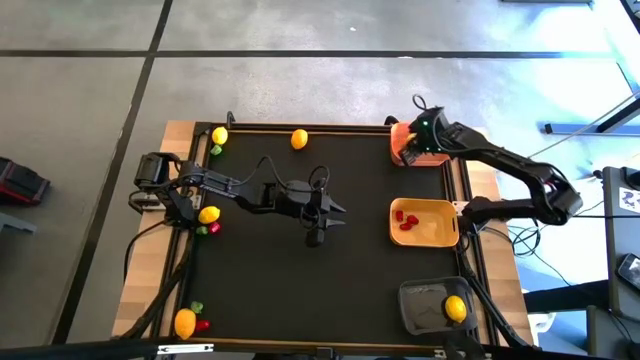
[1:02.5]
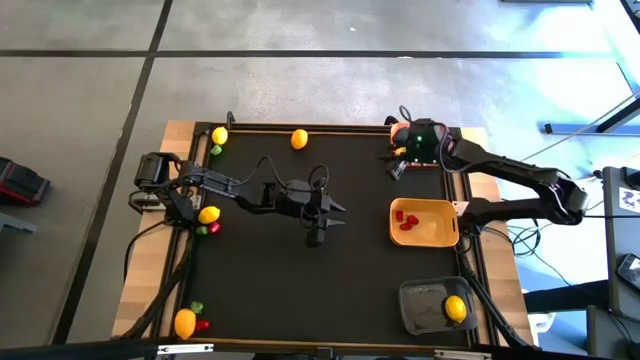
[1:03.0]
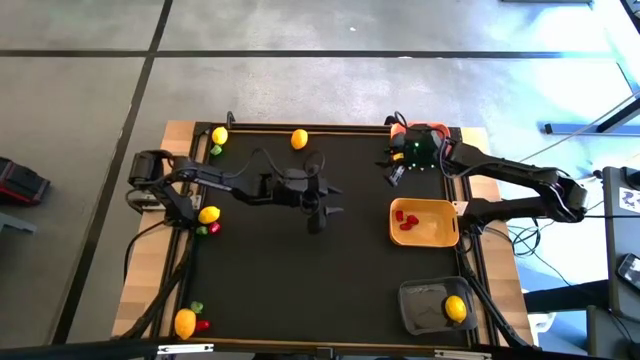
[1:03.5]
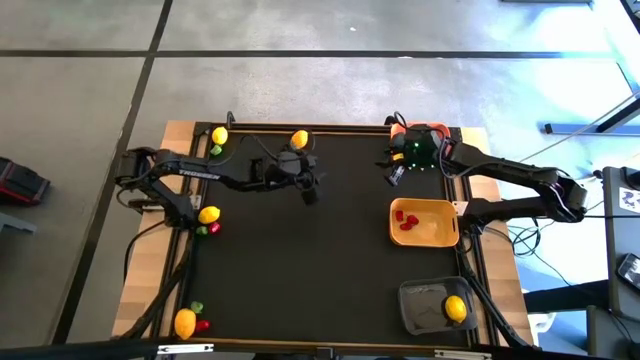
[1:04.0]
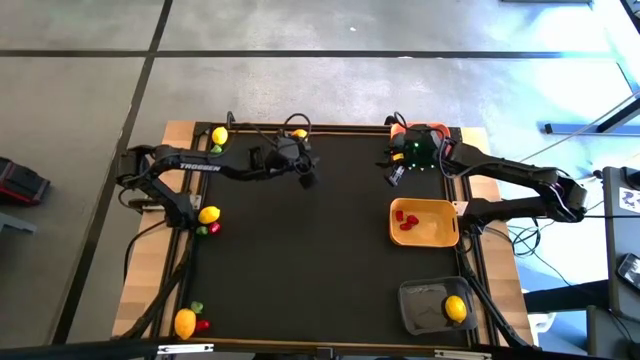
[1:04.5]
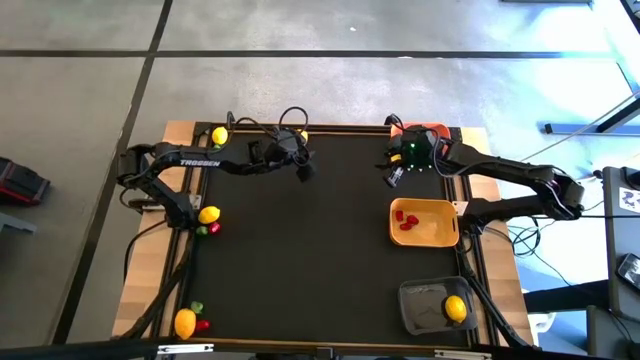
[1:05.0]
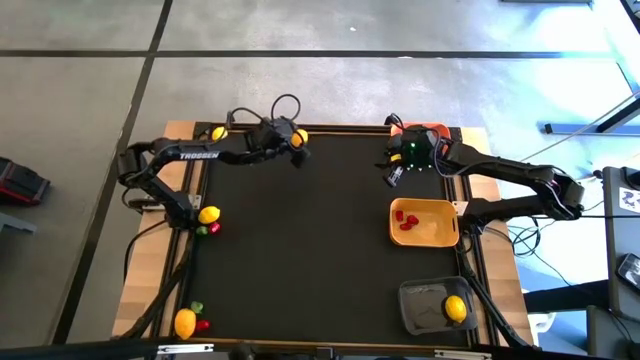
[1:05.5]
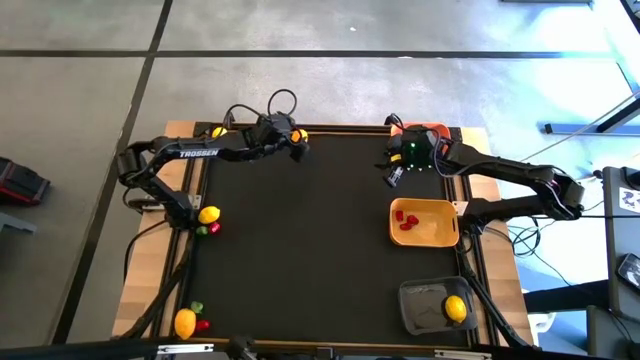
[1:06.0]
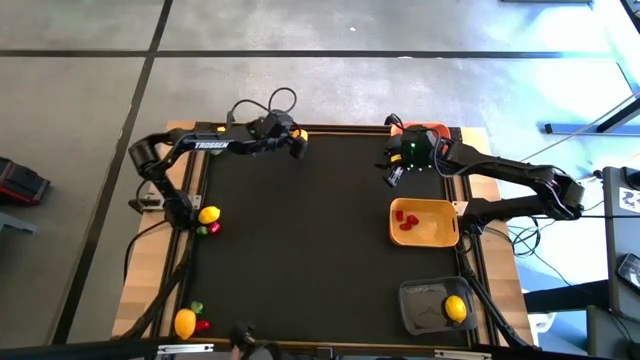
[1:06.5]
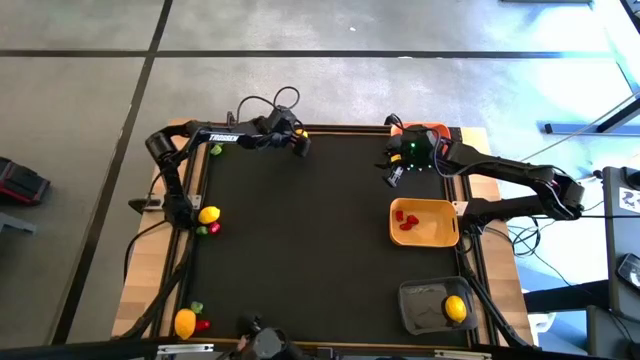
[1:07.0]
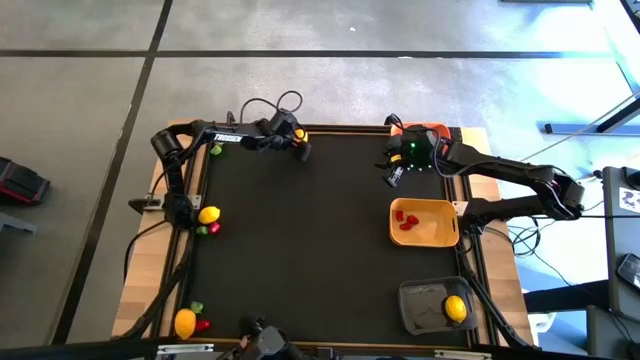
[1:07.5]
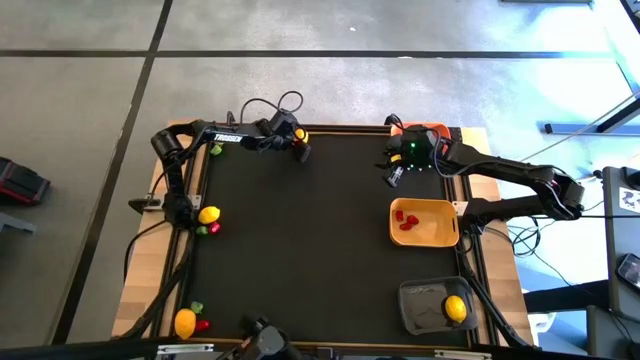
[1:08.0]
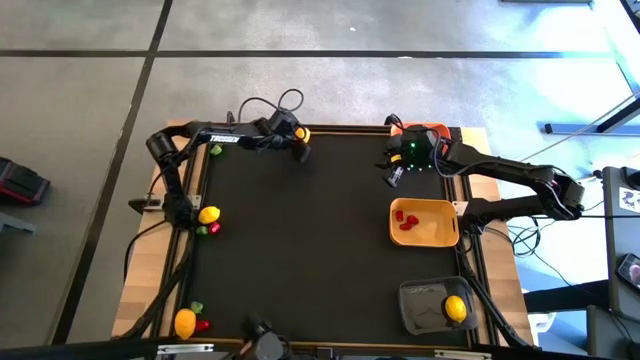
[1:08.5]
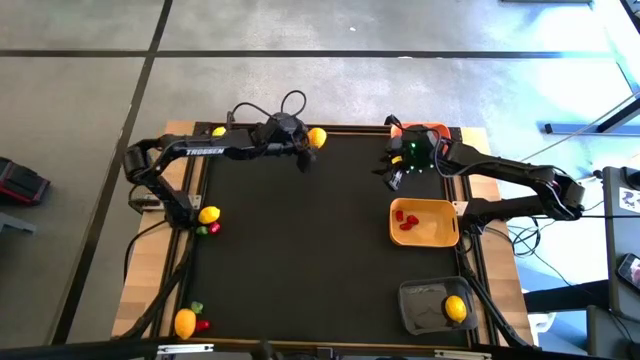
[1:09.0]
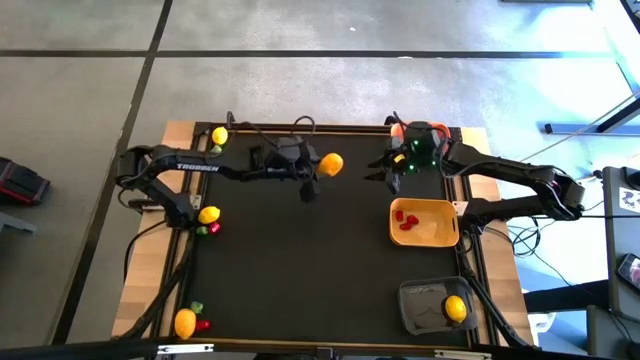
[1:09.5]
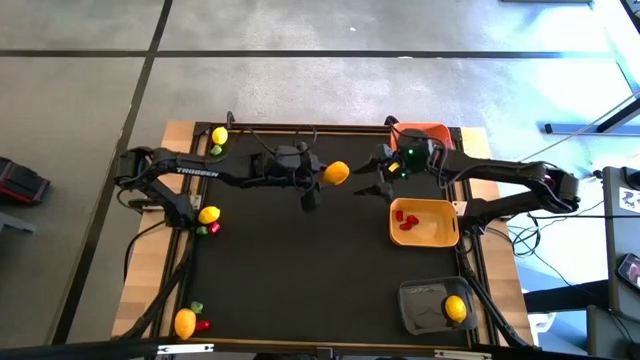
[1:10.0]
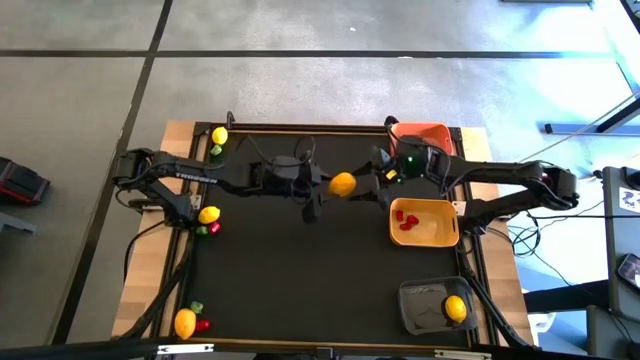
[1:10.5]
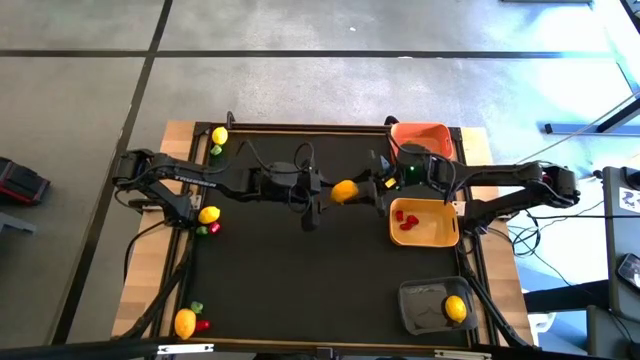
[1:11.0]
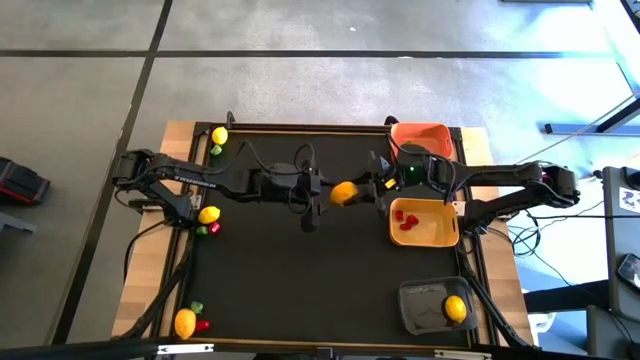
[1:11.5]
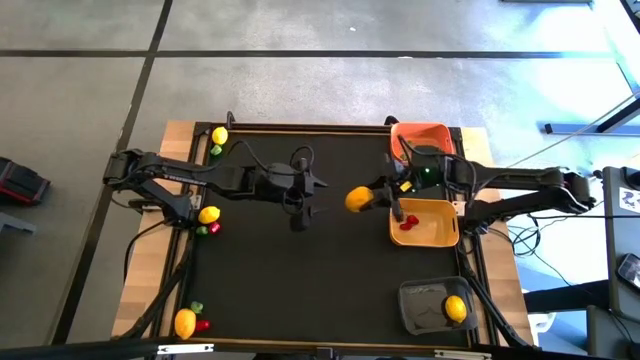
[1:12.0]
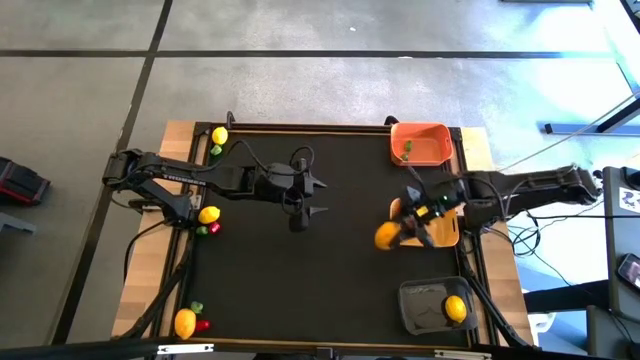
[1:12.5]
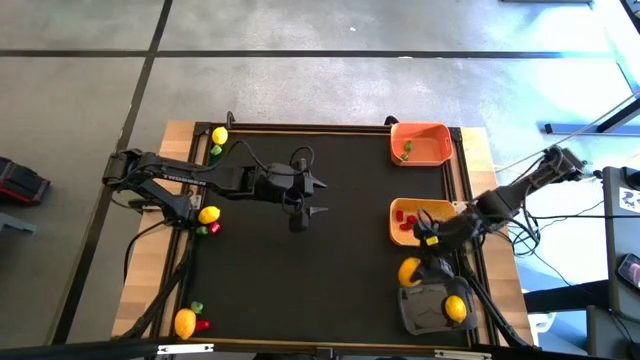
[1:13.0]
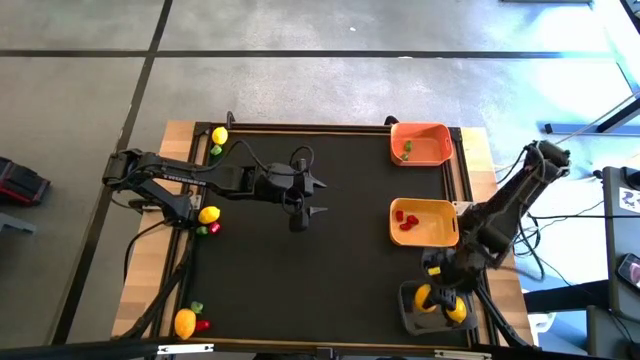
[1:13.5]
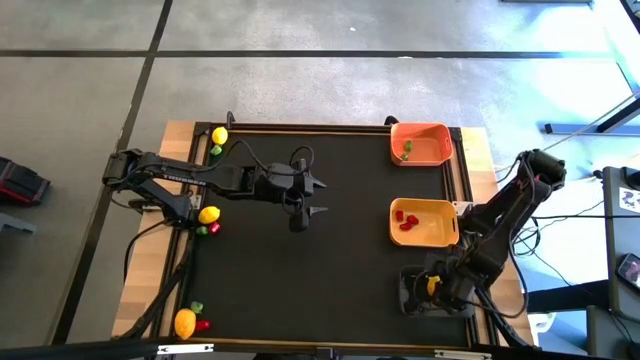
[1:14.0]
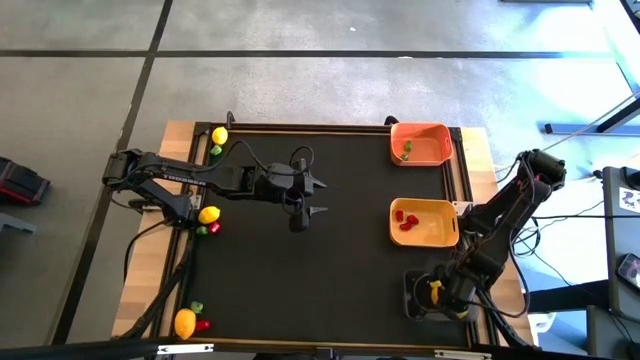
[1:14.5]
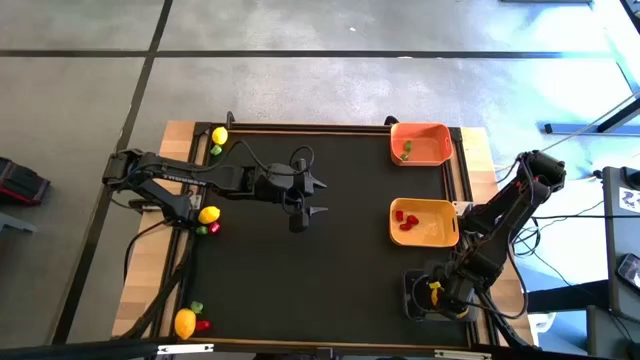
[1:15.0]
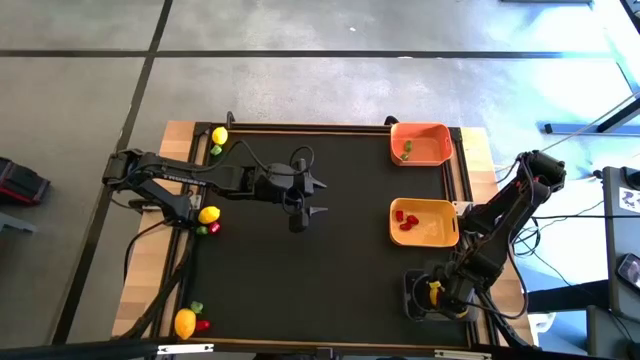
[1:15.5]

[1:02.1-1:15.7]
Task: Sort produce into baskets
Put the top right yellow lemon into the black bin

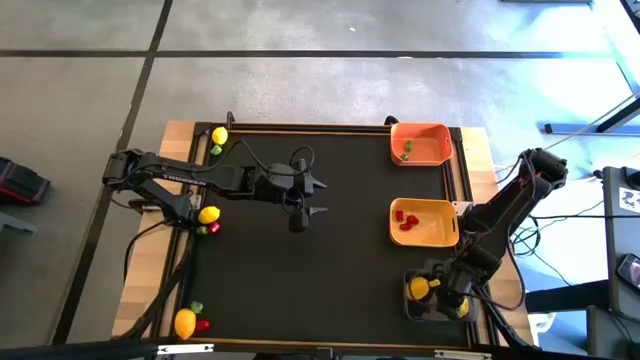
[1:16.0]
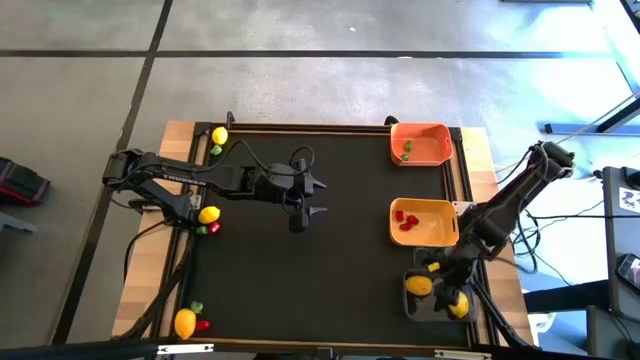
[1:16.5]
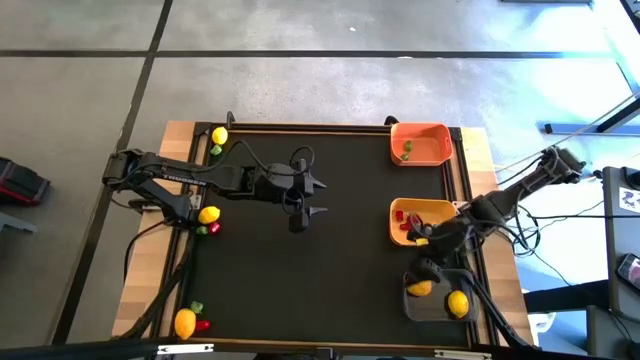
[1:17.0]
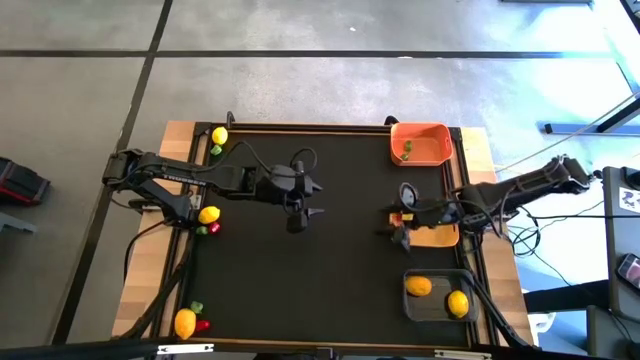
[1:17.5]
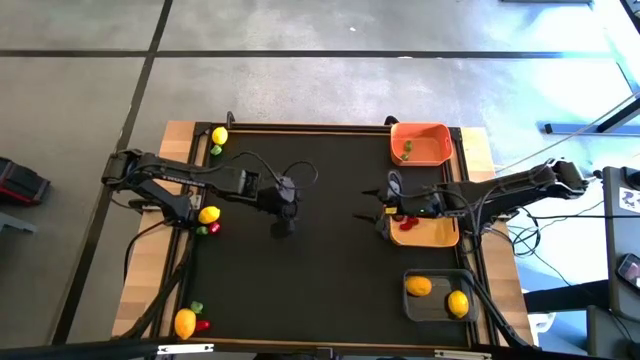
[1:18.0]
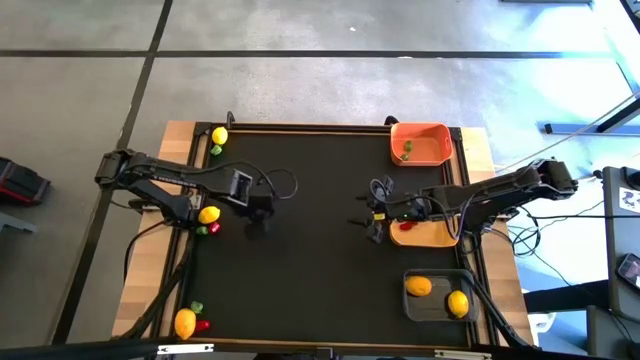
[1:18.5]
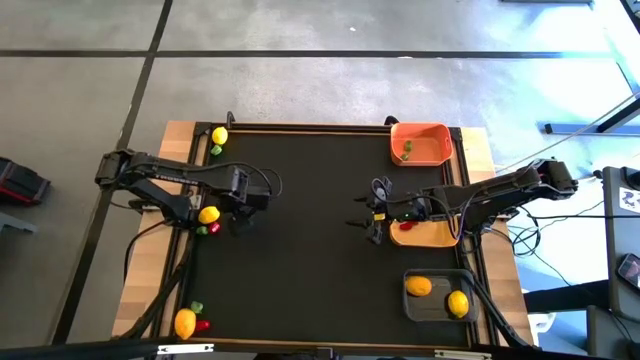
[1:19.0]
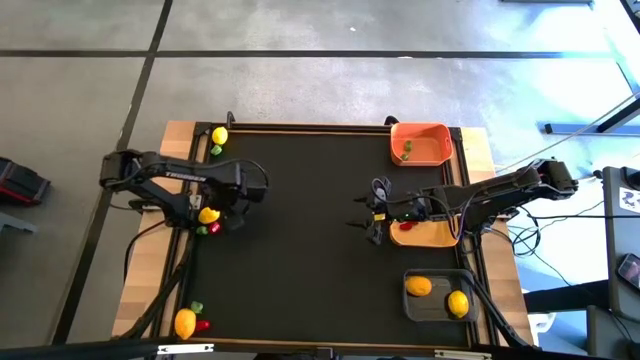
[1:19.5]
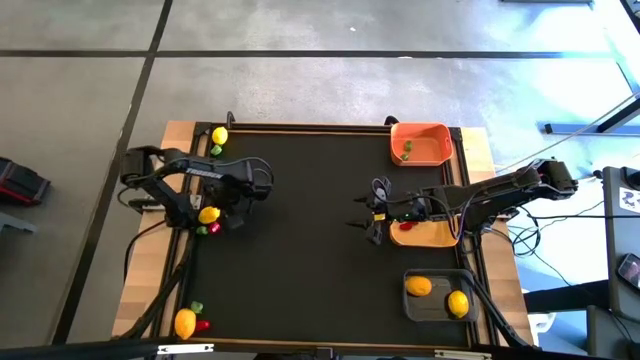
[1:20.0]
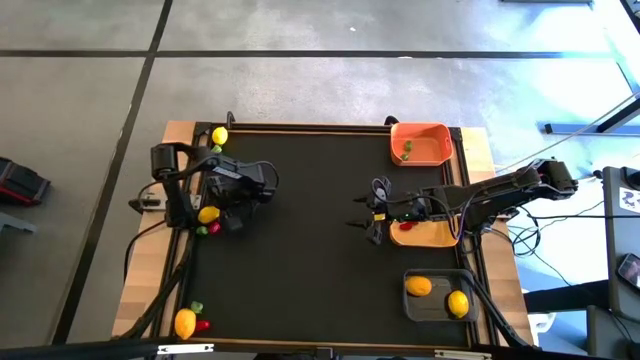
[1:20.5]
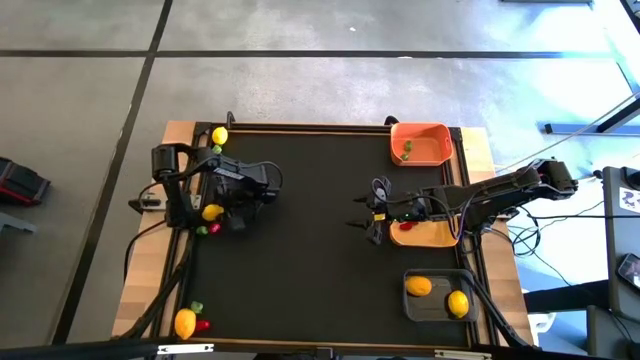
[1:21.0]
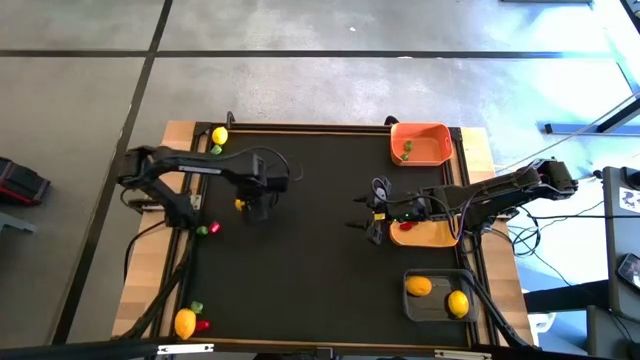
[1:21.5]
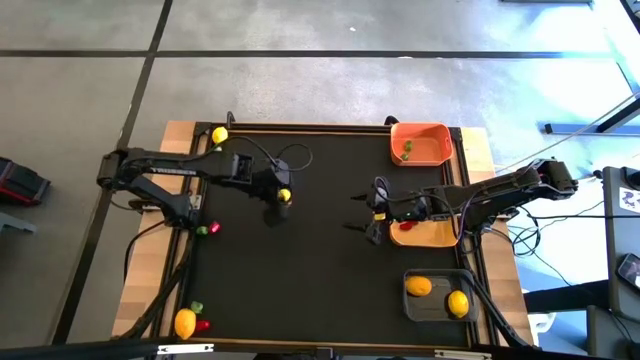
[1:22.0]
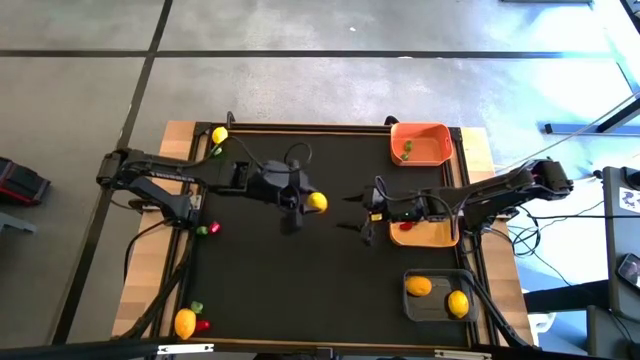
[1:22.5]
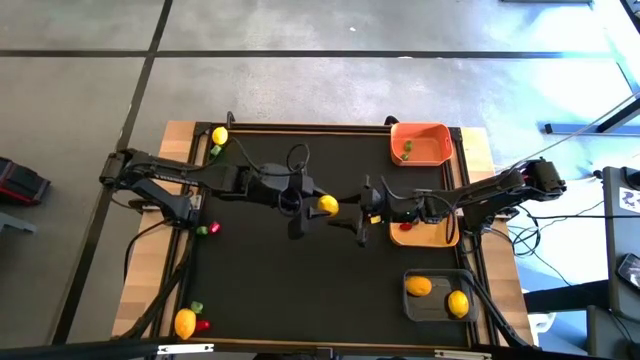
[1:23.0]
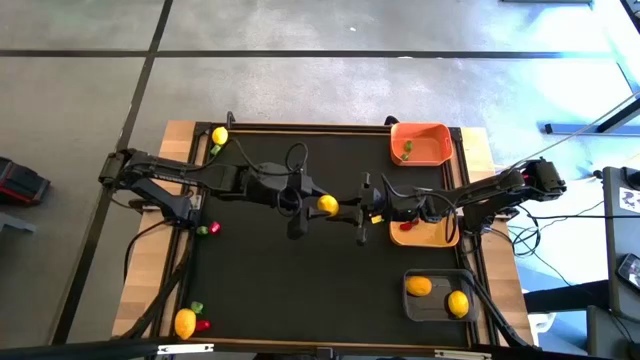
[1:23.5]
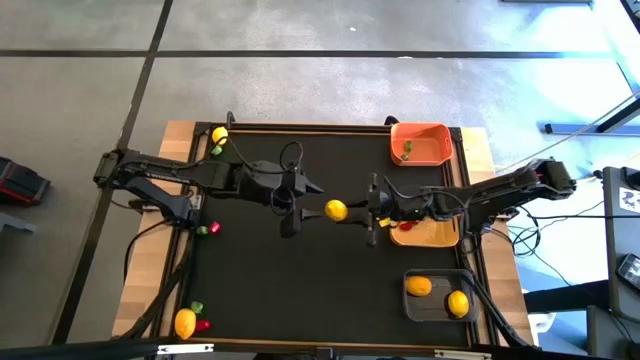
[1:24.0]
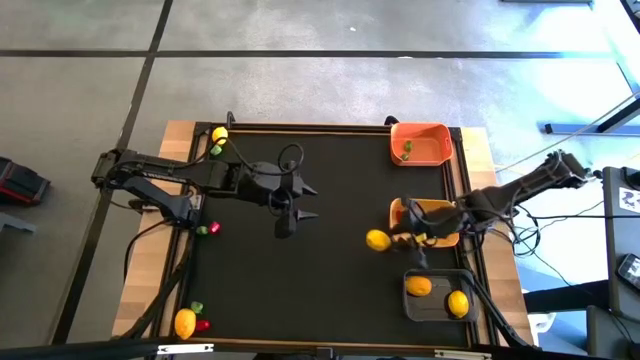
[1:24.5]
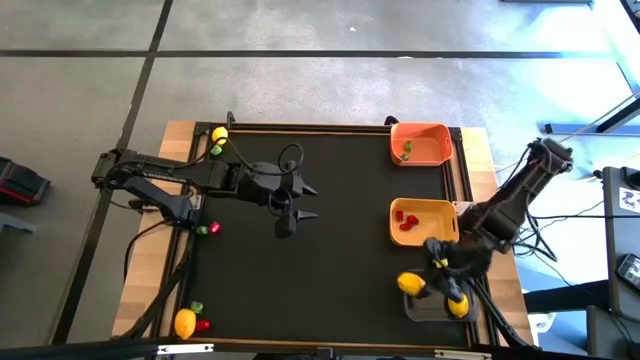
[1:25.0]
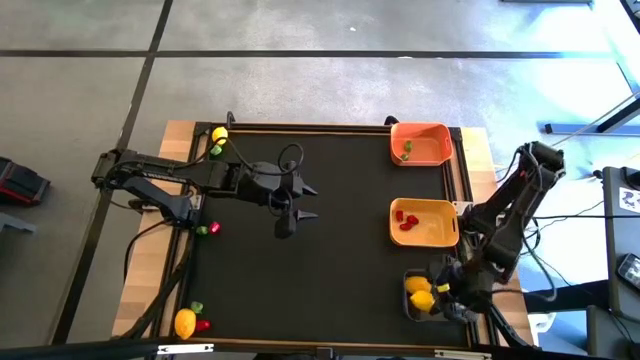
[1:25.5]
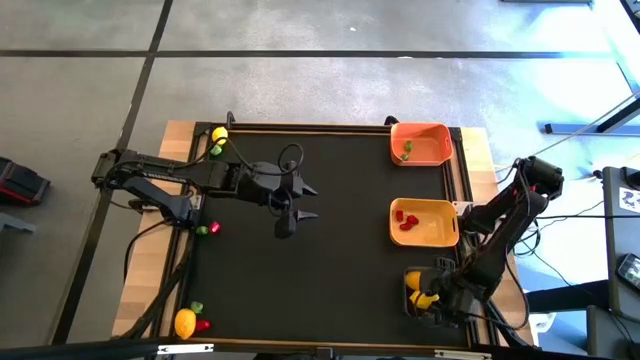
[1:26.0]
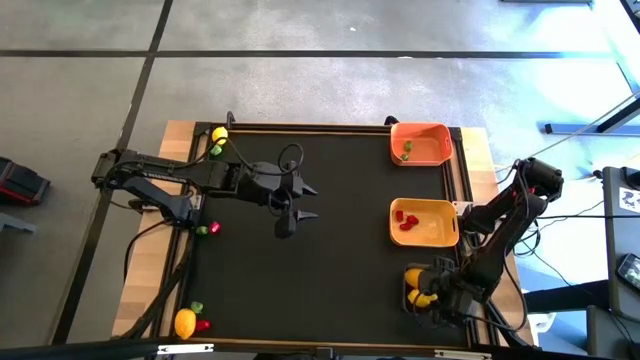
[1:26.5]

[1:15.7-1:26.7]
Put the center yellow lemon into the black bin
